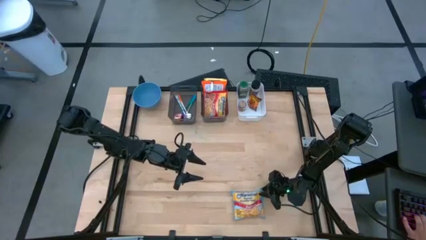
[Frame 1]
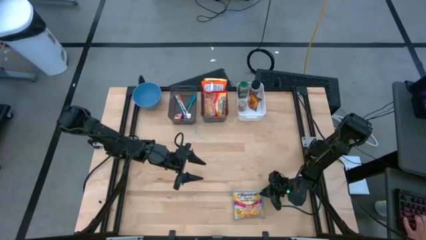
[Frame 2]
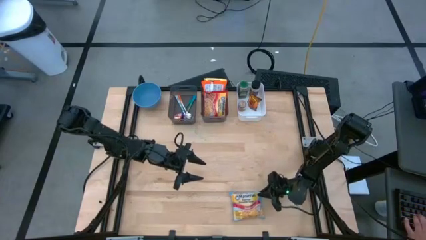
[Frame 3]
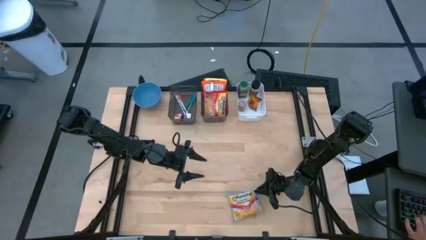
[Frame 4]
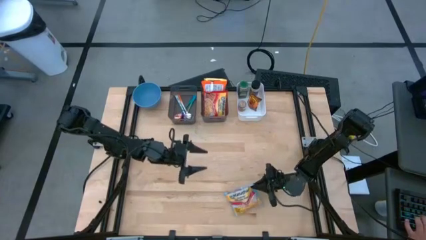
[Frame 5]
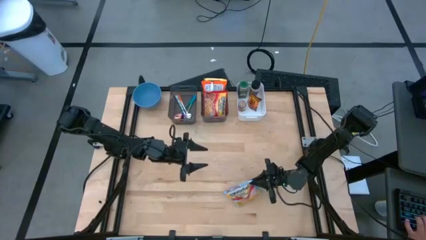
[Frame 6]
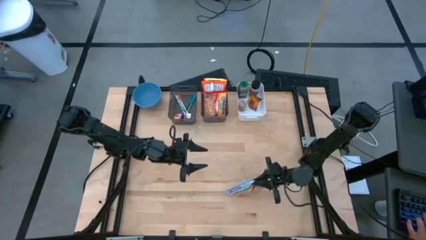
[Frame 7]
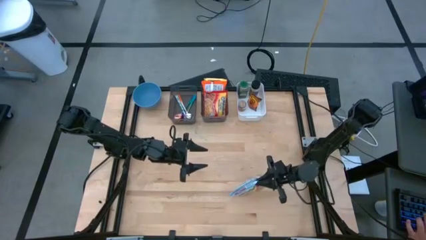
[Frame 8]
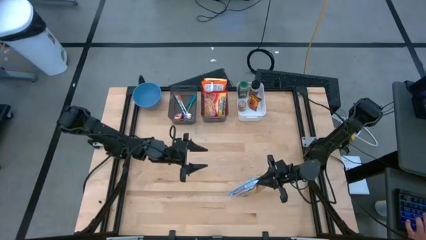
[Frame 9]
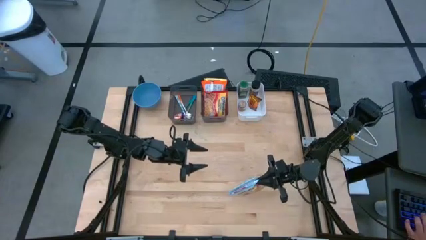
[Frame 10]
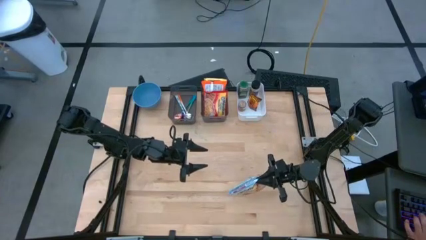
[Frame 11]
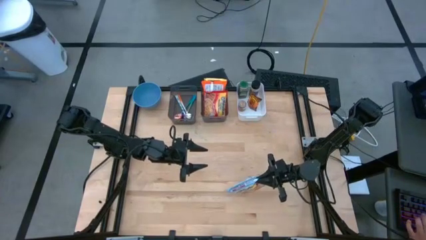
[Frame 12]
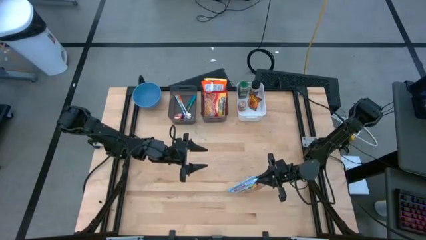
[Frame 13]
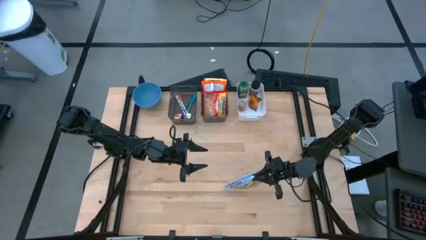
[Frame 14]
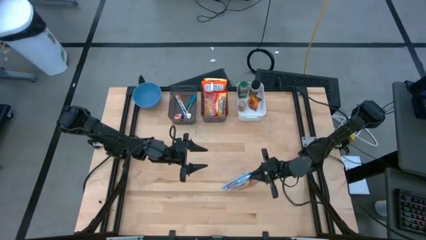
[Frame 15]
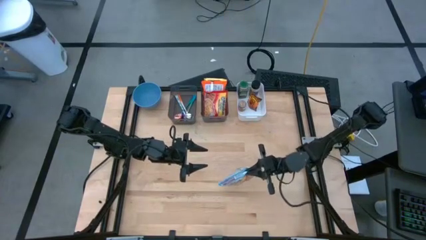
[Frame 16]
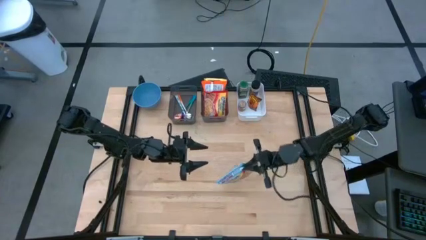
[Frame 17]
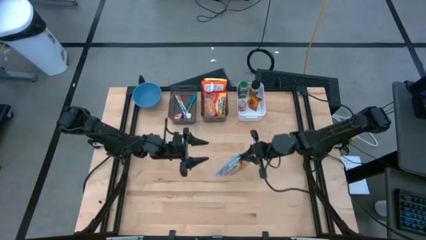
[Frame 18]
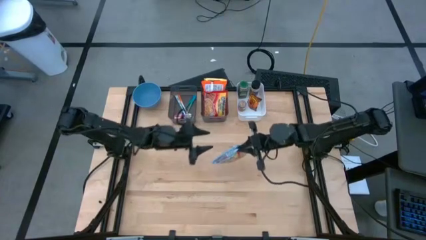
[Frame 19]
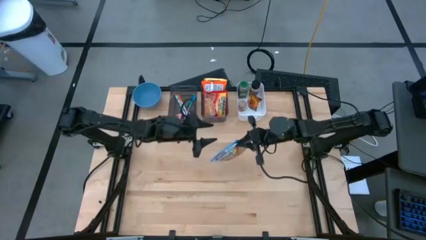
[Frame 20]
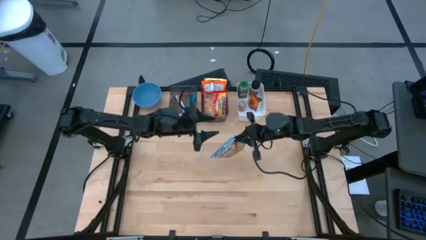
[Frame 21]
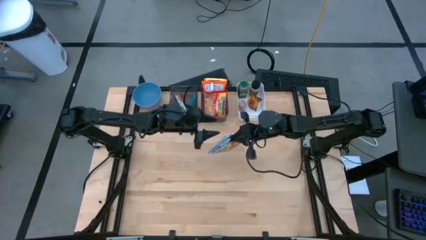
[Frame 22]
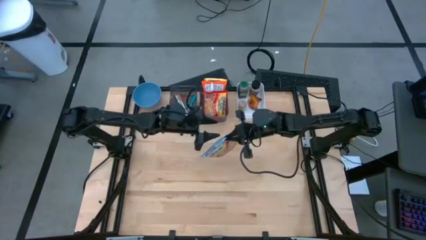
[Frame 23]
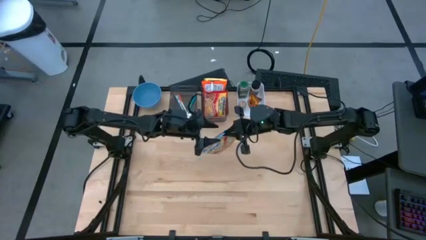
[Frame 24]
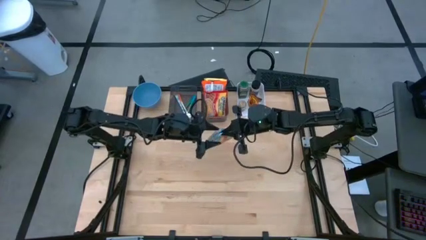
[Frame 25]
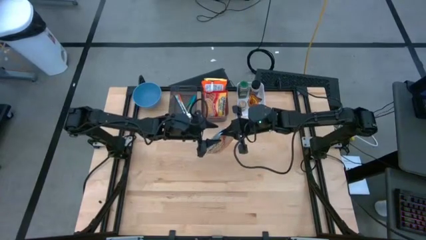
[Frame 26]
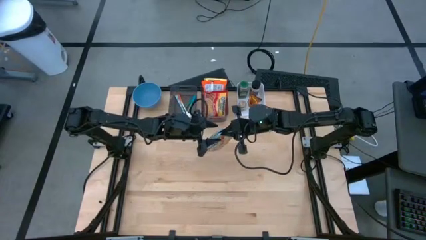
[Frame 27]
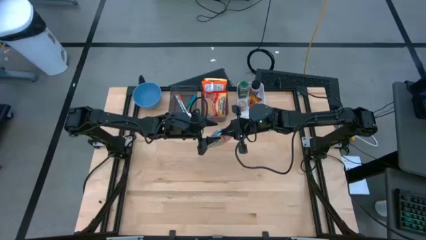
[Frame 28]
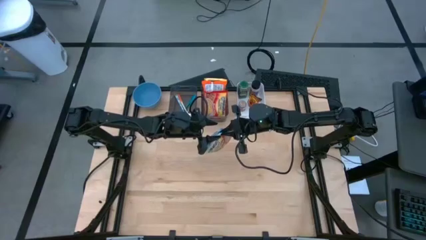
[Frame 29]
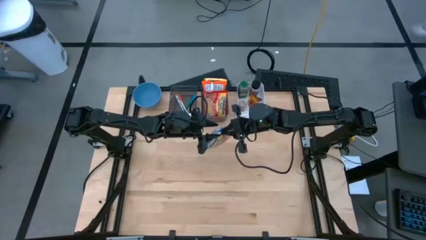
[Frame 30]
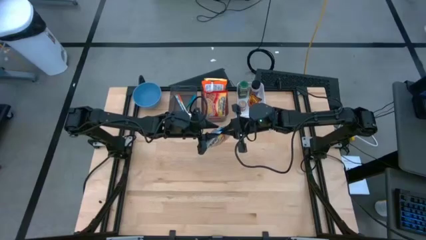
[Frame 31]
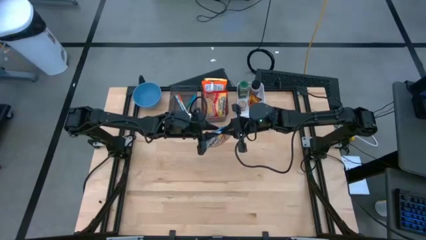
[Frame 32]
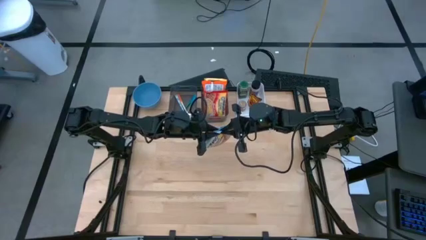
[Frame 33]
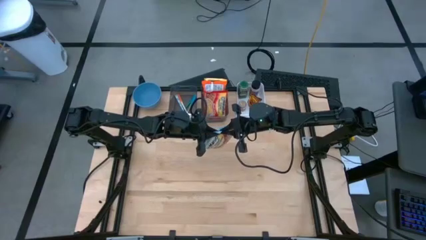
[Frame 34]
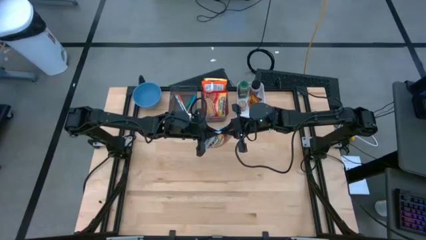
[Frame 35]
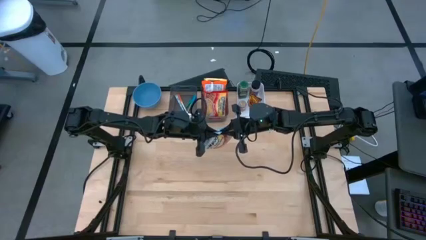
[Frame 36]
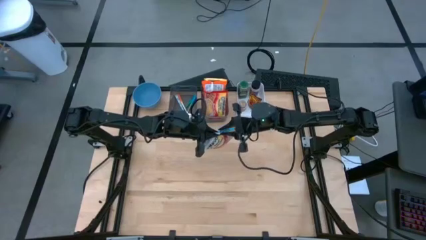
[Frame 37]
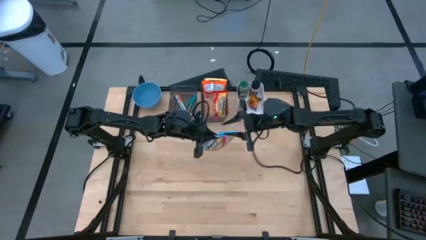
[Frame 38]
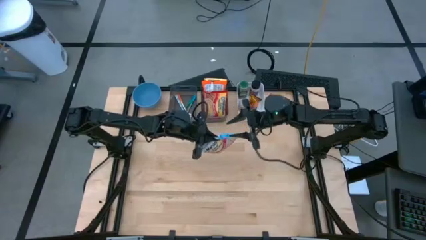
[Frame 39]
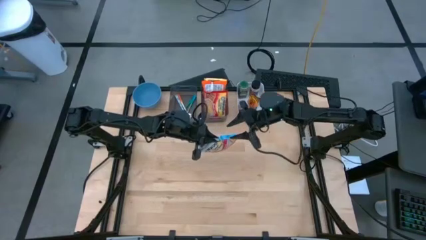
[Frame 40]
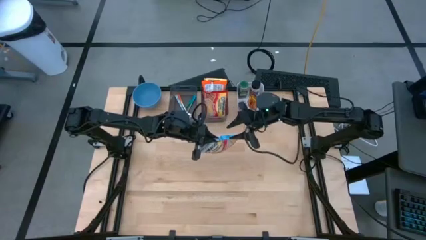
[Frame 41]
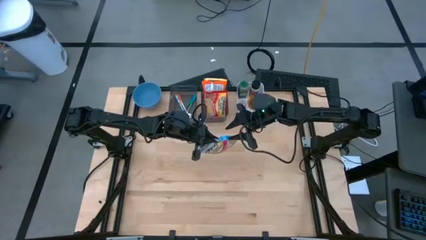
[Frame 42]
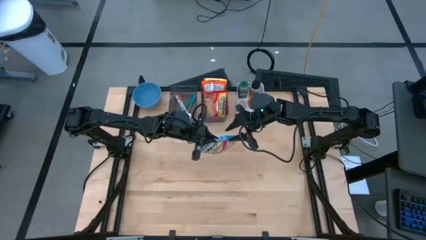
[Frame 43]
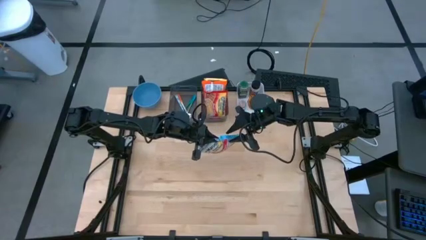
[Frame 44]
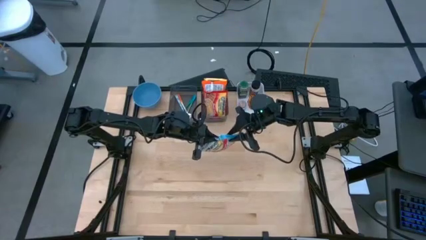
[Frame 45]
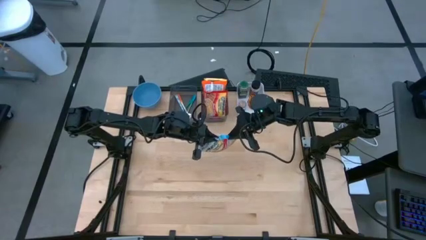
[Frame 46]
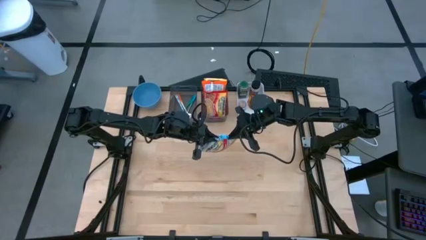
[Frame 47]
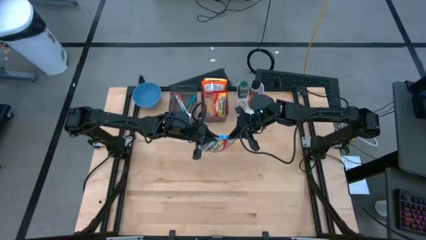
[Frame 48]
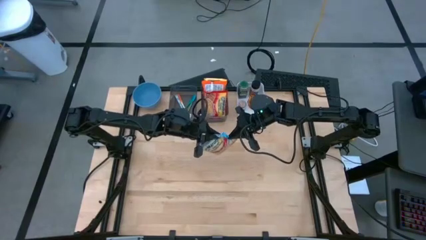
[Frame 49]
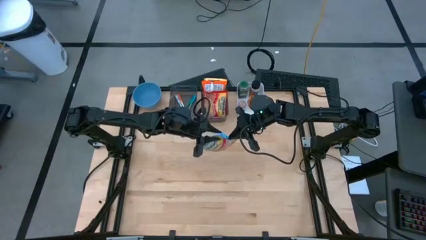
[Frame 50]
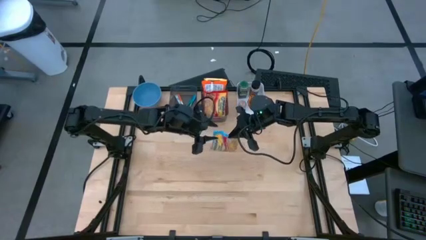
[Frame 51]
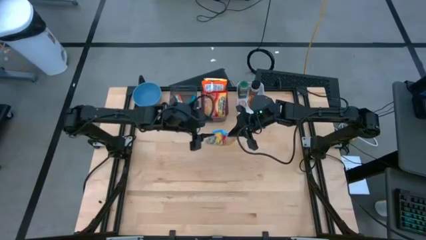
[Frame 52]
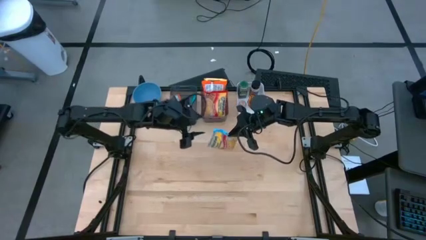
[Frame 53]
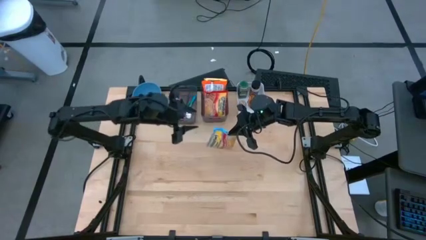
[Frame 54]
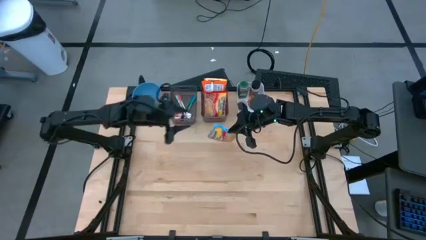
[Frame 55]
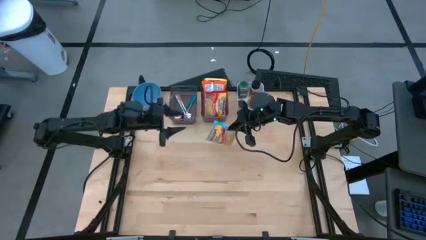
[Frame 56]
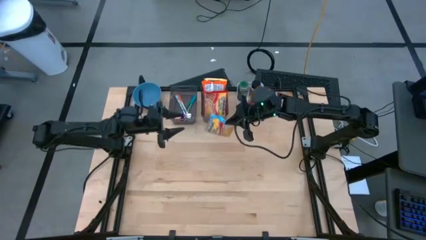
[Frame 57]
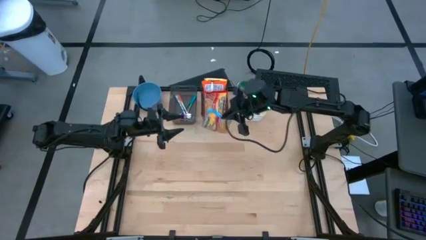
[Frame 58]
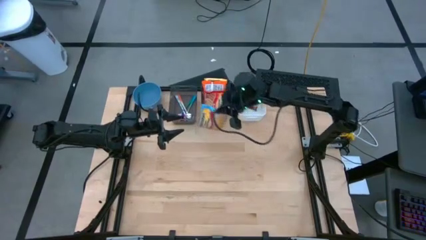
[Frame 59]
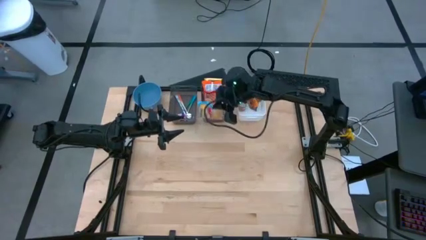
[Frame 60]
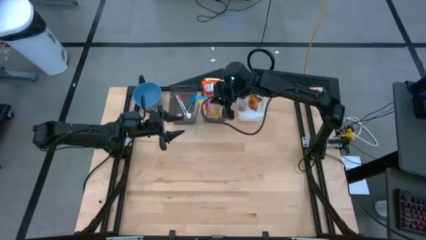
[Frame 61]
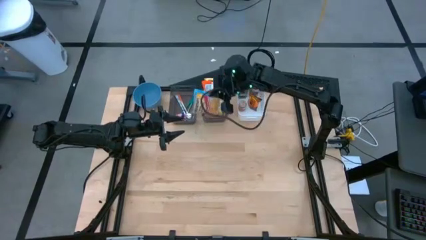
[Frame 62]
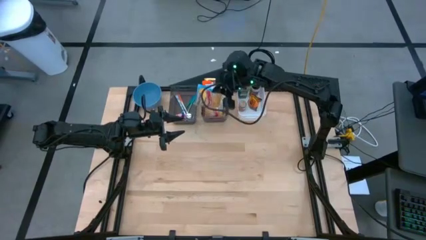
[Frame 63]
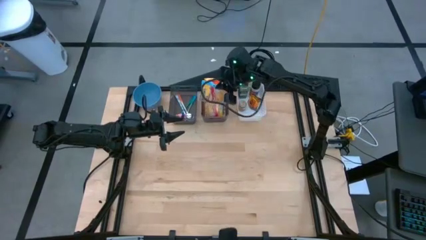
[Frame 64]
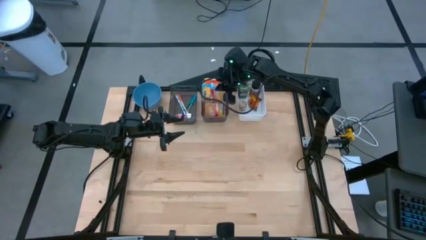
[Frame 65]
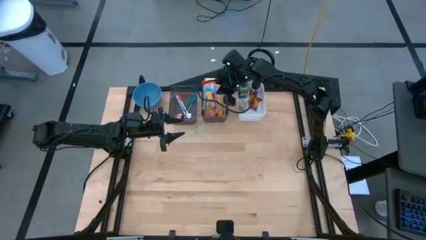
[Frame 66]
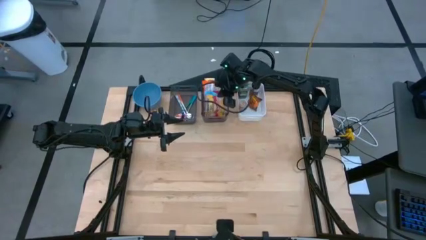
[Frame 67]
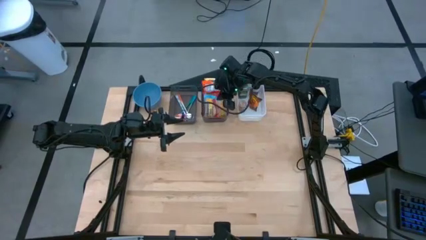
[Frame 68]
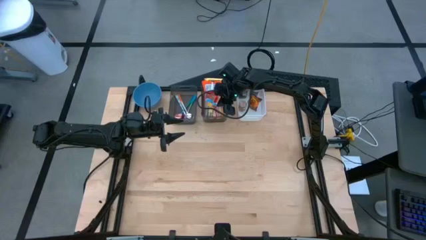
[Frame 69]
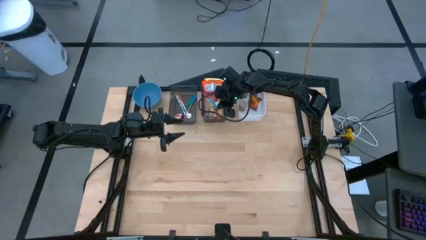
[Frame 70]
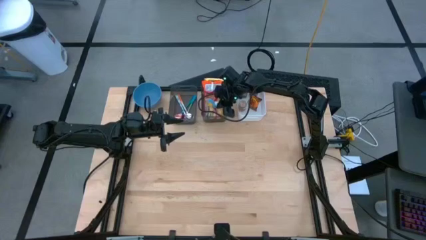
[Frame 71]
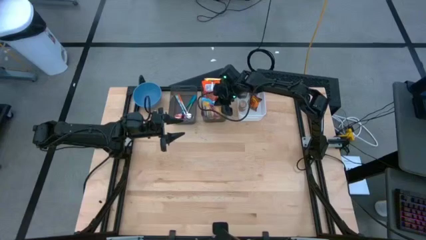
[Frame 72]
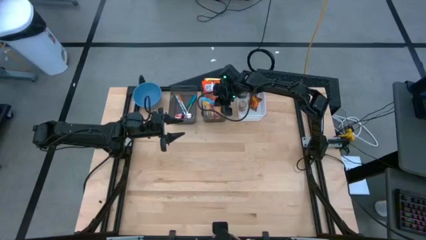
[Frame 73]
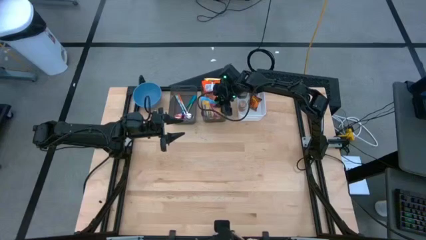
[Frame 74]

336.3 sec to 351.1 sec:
Task: Pick & Place Food Item
Put the blue noodle pack into the right black bin
